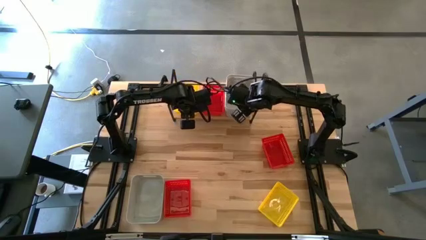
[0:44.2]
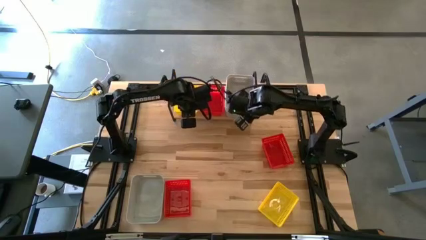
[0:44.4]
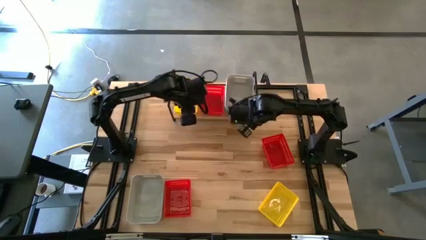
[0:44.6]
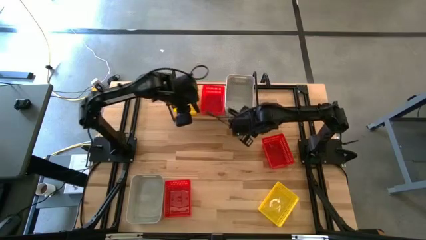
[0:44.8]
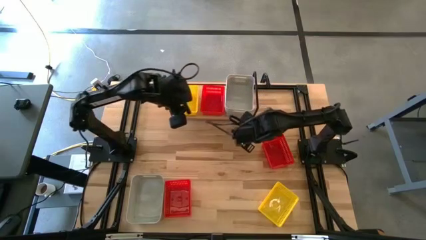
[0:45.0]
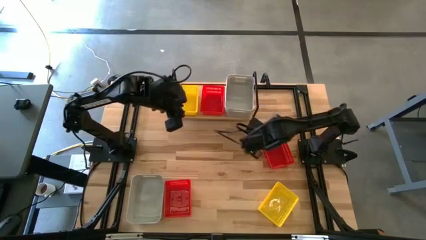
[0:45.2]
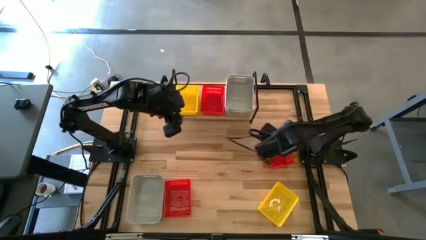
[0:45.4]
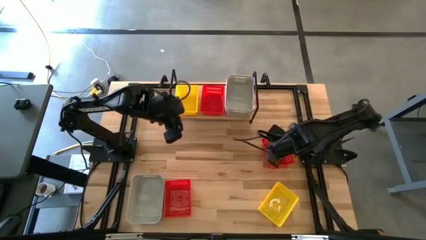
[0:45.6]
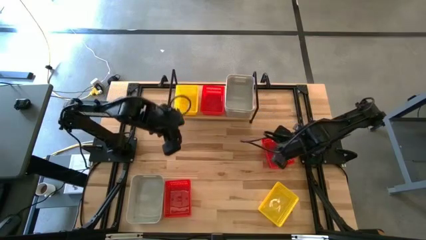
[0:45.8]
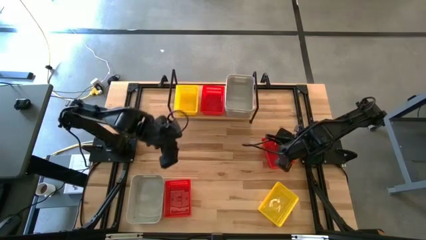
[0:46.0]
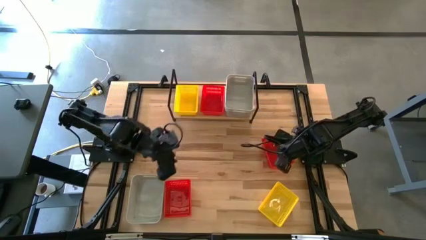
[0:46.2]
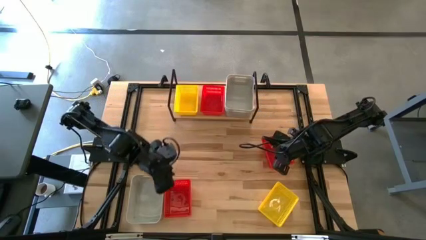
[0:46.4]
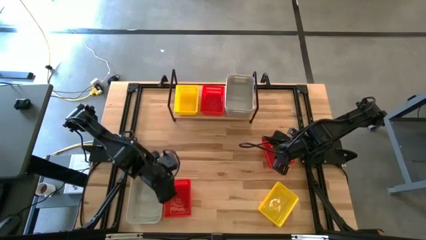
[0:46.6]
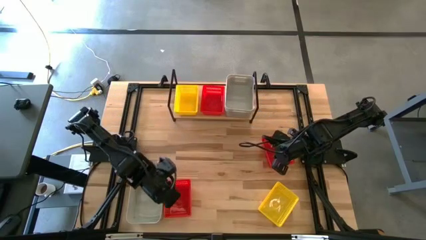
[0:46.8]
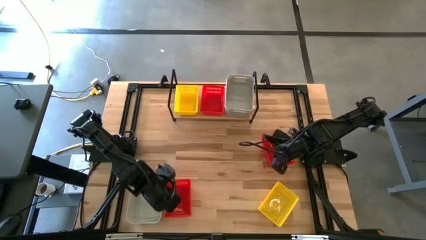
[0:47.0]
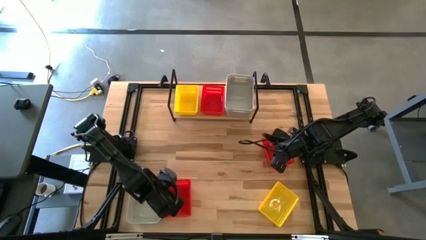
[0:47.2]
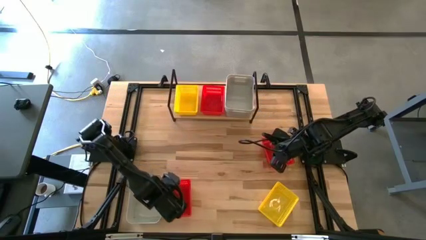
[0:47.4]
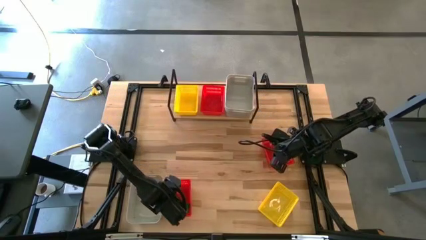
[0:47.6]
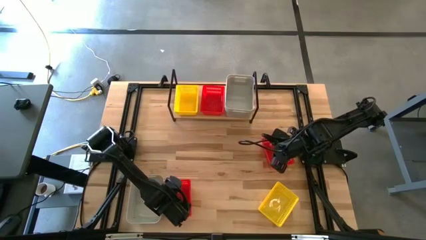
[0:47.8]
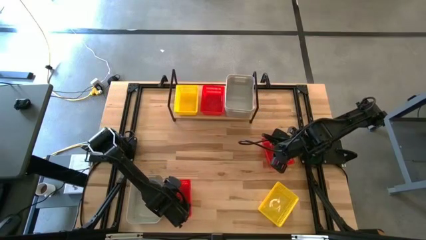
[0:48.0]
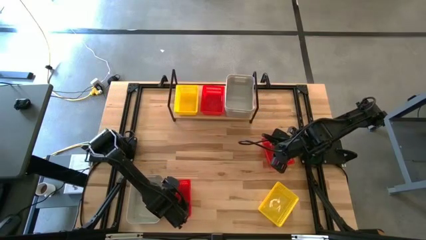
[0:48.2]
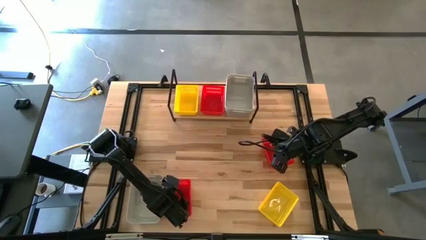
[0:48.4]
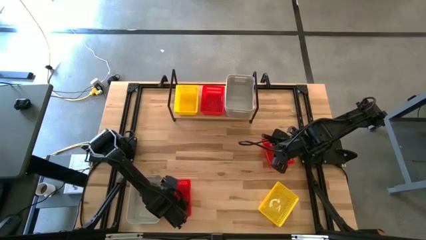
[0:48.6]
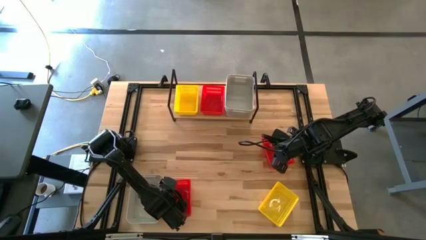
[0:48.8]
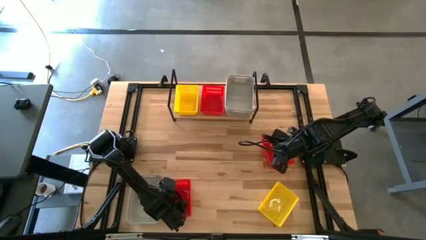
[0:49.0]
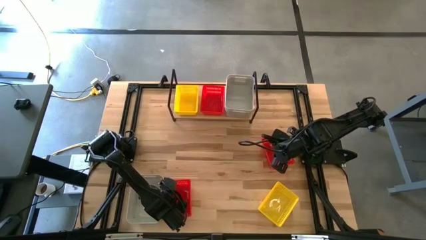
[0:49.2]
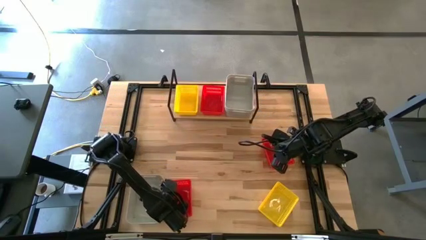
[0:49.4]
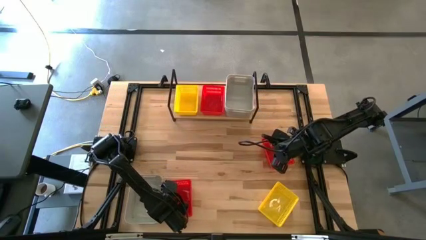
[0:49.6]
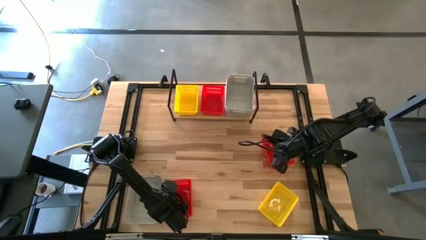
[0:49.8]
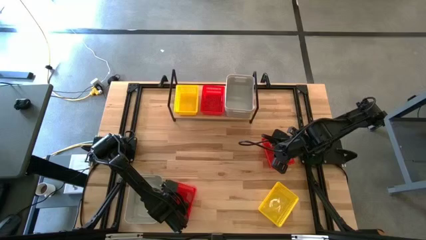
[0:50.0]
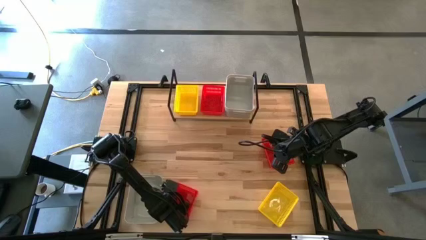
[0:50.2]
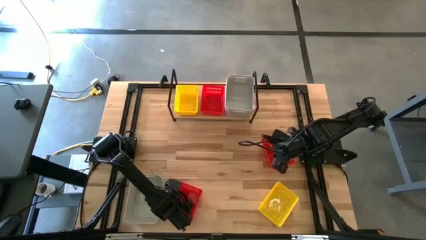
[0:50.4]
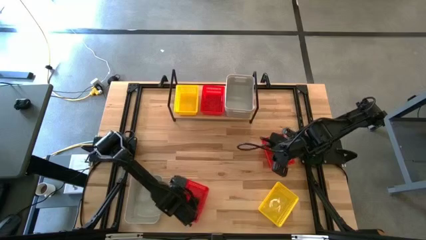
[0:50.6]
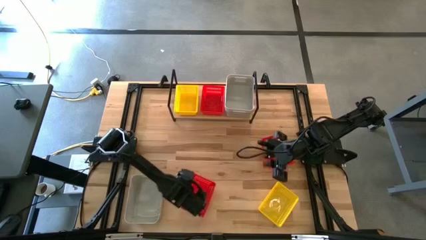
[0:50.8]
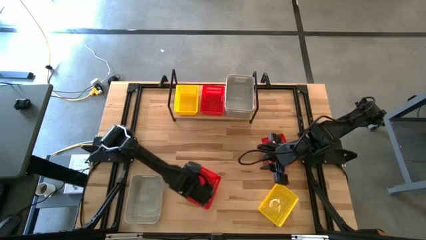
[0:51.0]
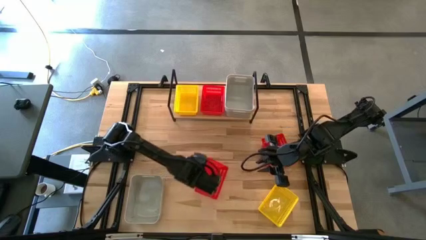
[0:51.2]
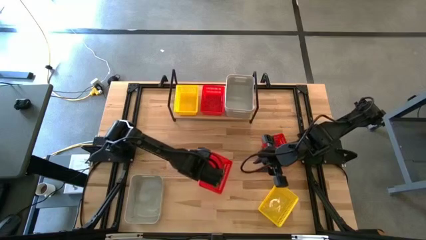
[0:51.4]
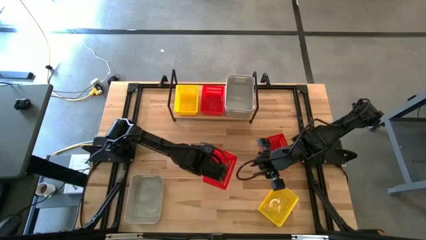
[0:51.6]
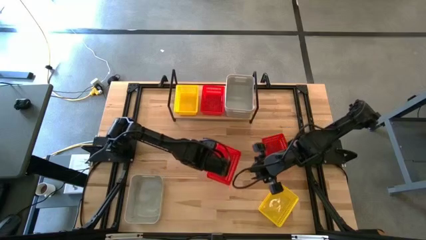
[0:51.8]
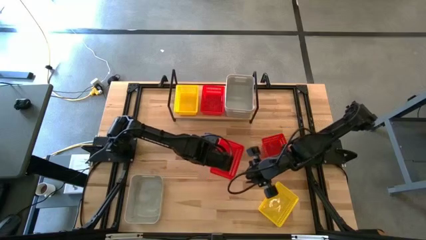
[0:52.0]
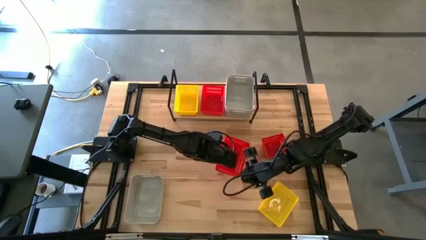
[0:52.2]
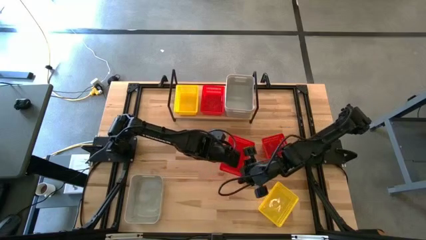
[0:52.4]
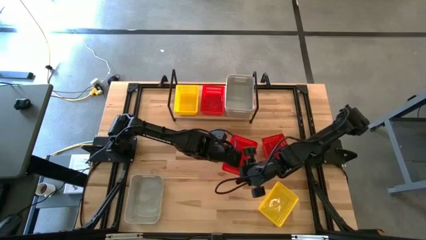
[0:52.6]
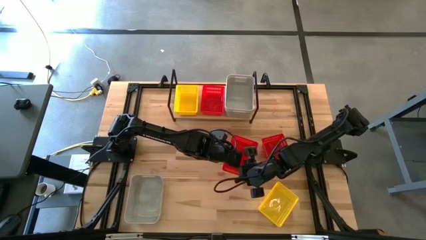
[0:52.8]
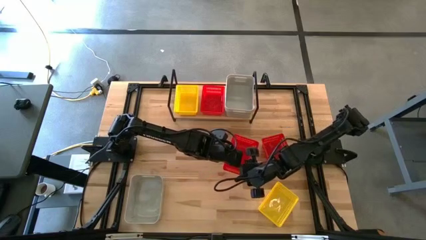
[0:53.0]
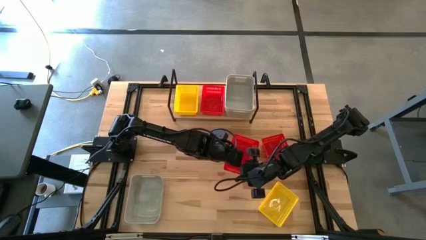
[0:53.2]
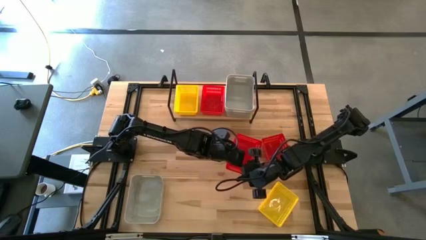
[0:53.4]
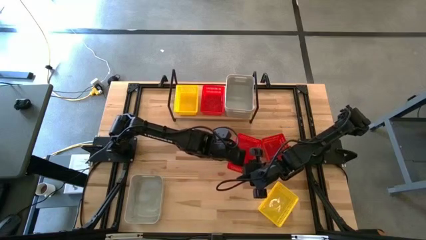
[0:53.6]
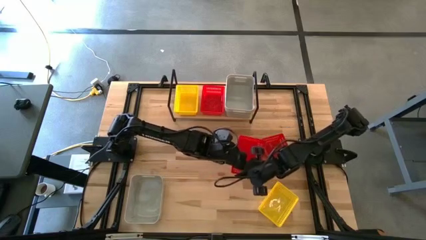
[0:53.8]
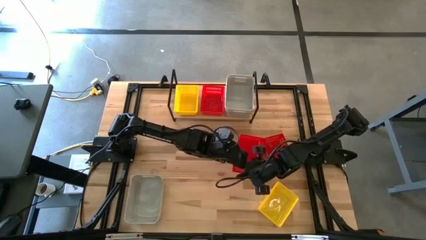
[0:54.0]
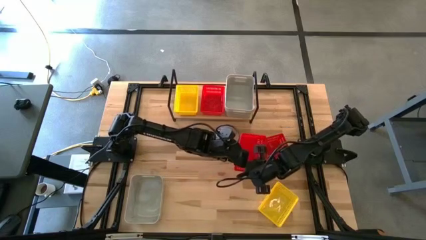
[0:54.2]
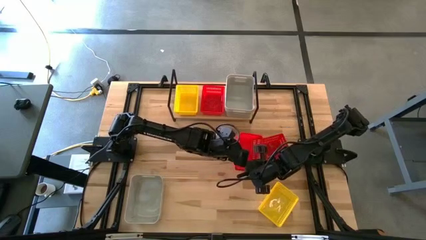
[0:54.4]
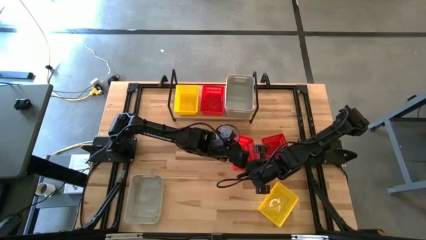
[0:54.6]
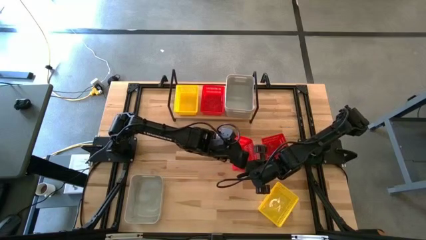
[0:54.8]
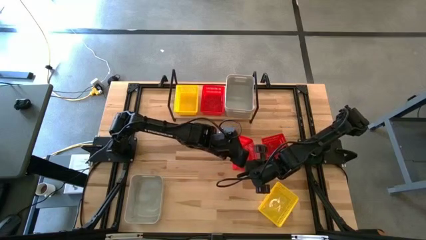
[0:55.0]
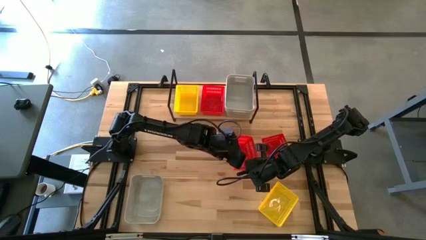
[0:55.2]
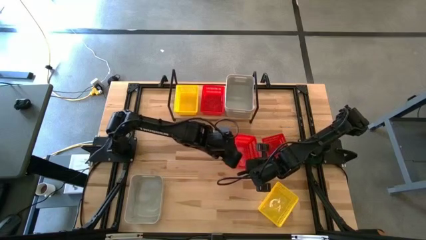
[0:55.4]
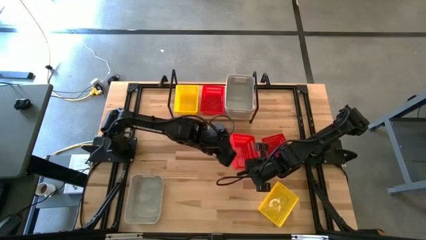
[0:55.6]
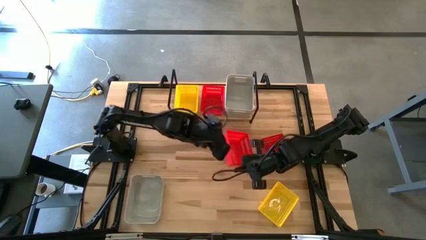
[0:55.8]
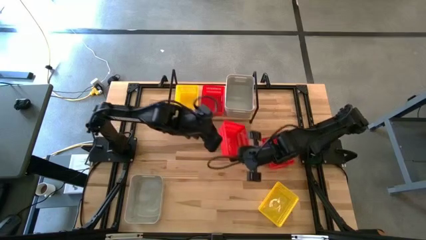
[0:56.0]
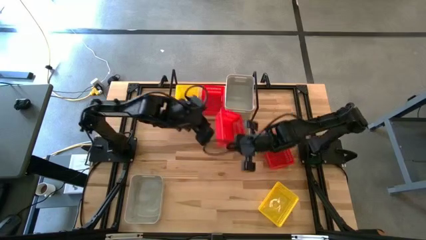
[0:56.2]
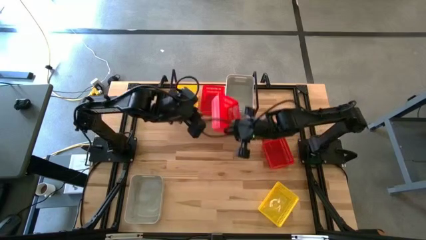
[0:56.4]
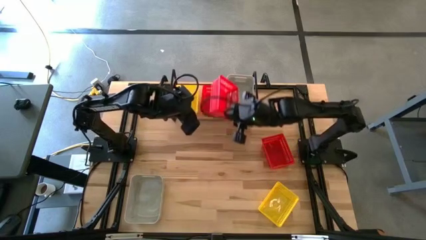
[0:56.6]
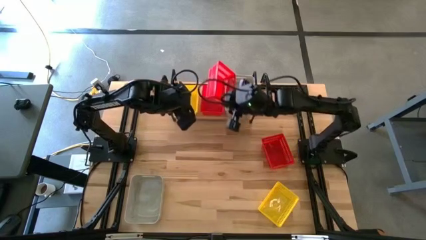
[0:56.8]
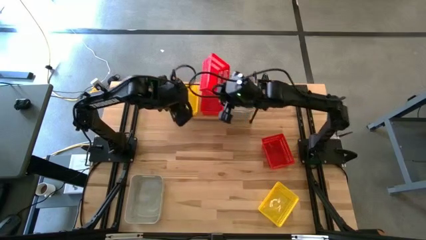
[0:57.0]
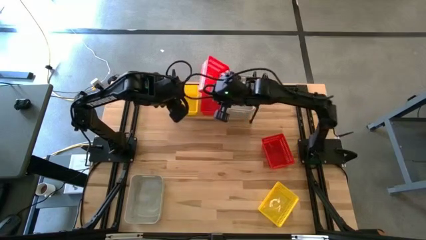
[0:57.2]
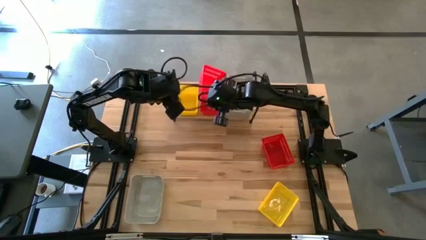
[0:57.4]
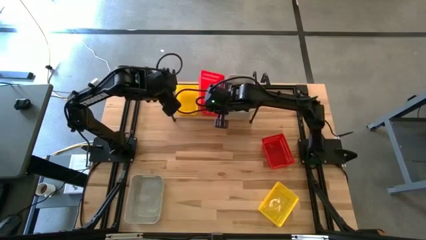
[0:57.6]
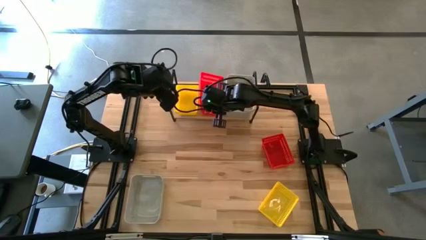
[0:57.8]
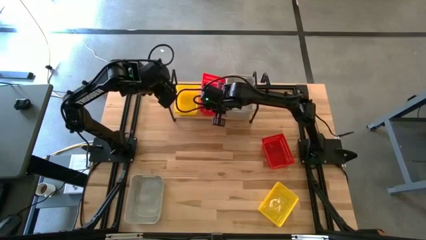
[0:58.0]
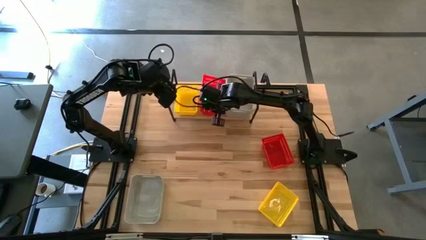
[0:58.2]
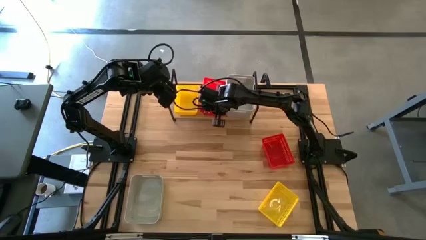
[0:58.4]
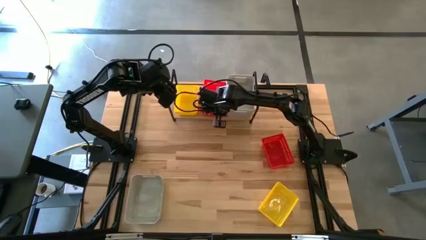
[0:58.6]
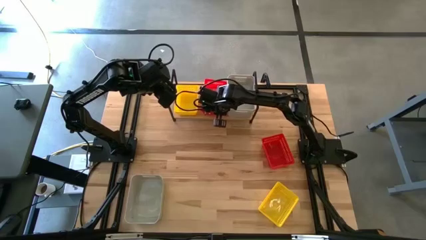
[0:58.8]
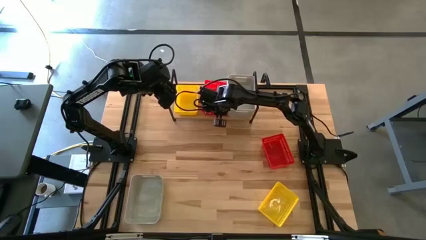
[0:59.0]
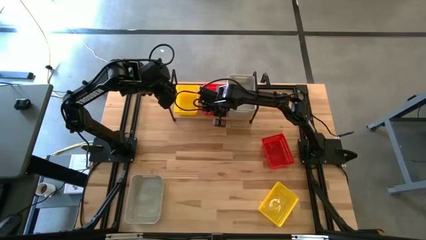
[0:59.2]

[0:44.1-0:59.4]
Task: Stack baskets on shelf by color
Stack the bottom red basket on top of the red basket on the shelf

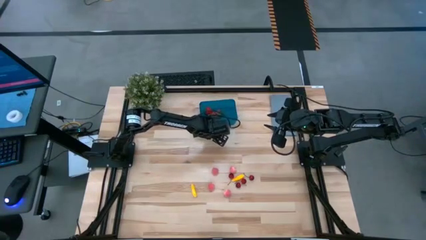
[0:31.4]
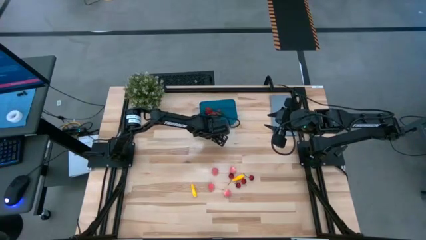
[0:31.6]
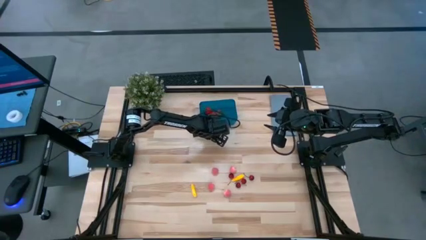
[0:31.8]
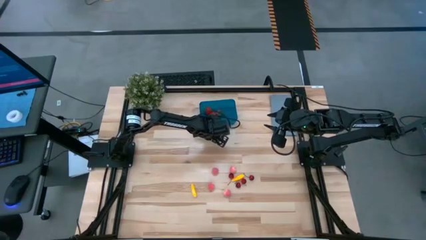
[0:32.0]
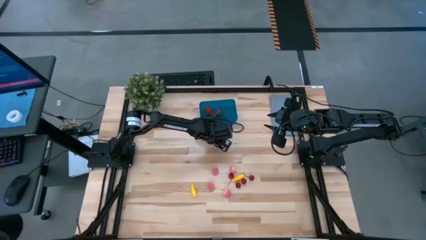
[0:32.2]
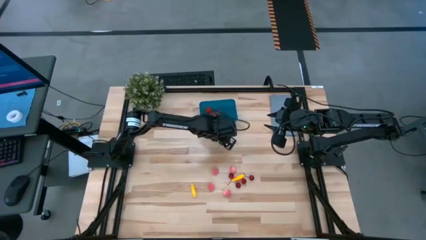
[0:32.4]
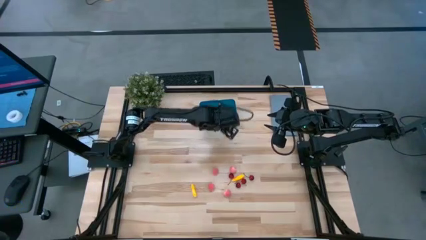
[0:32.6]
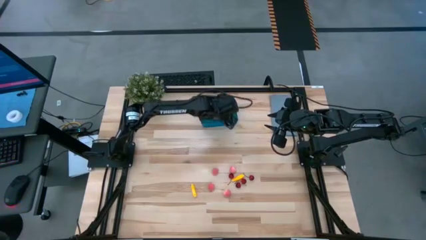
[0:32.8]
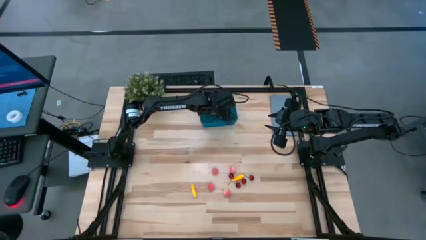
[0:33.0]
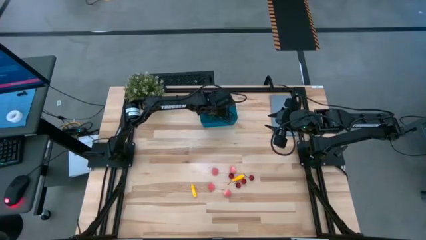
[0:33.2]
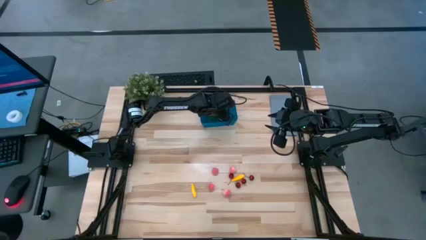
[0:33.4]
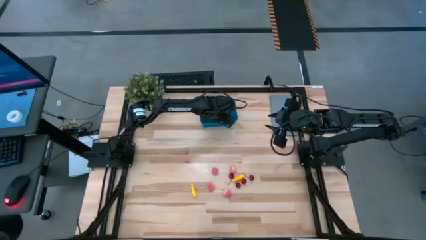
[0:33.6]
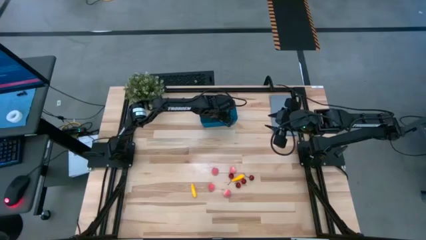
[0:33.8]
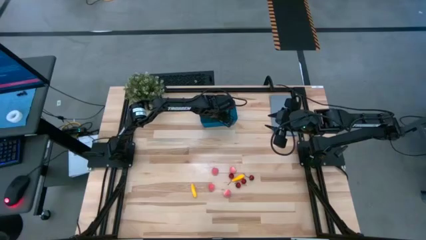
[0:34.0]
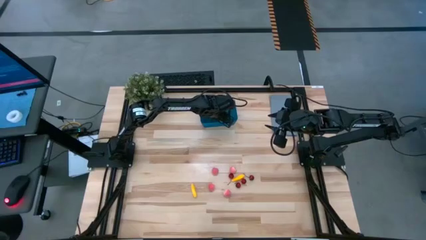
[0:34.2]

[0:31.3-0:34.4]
Task: Pick and placing Produce into tupperware
Put the strawberry into the blue bin
